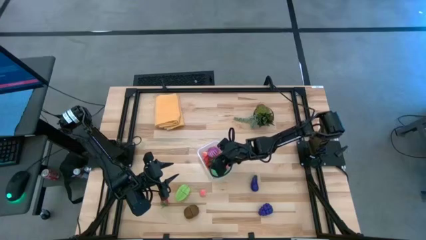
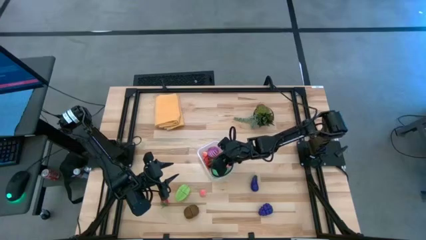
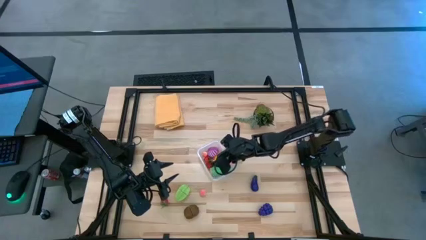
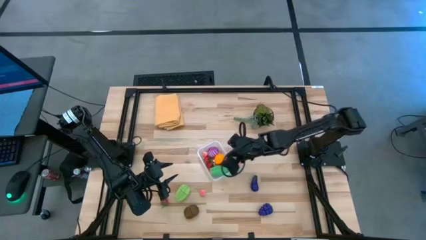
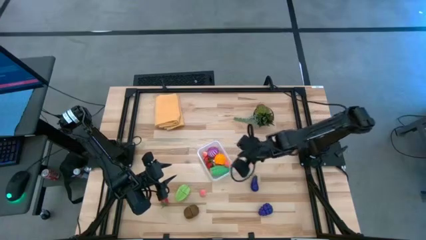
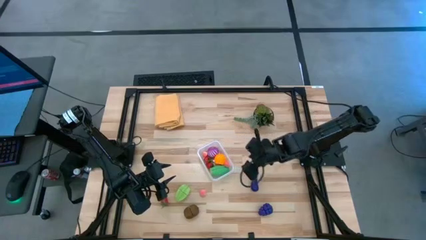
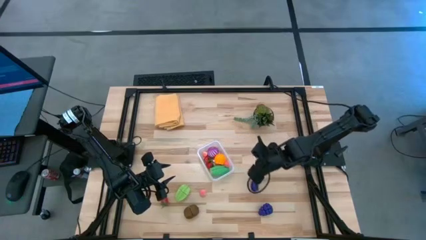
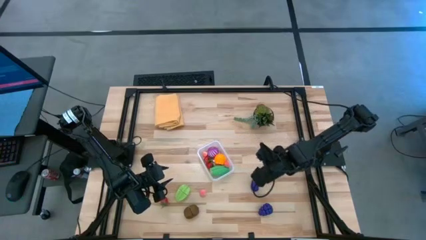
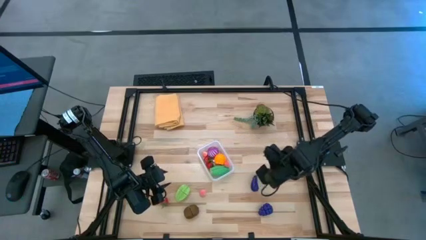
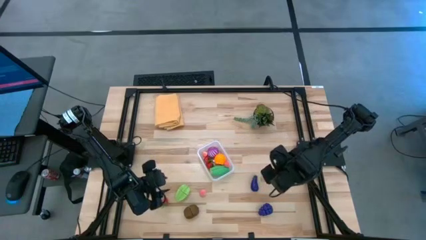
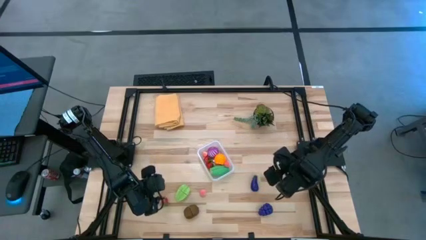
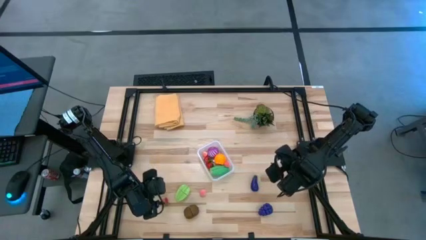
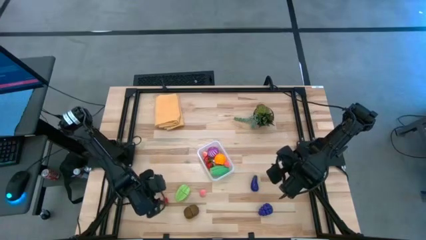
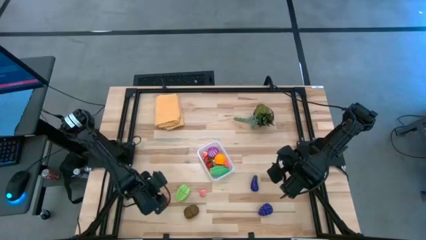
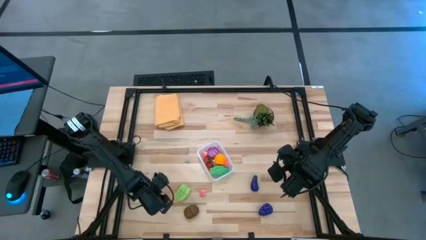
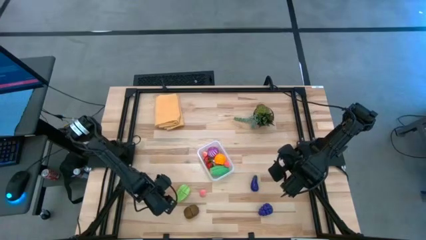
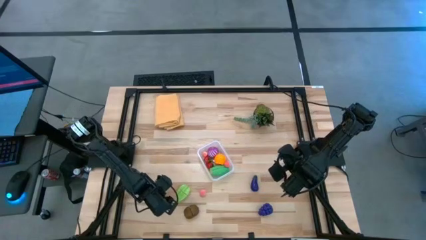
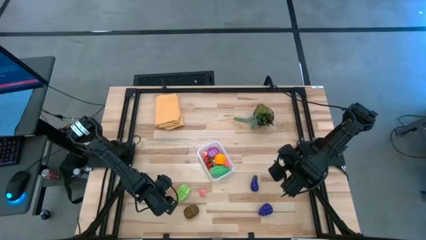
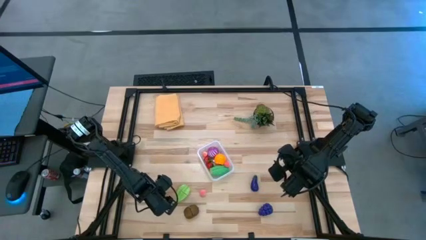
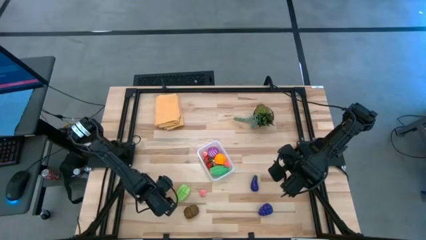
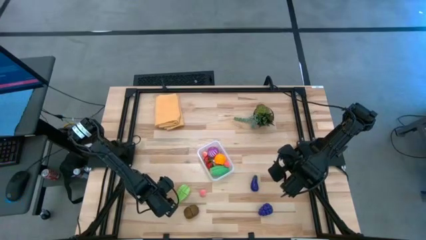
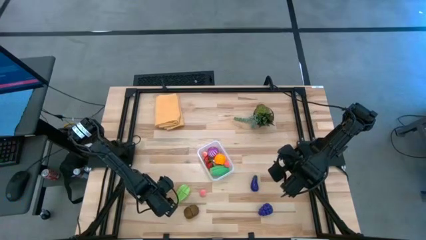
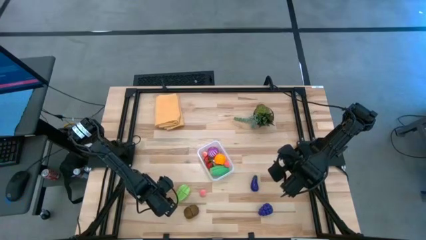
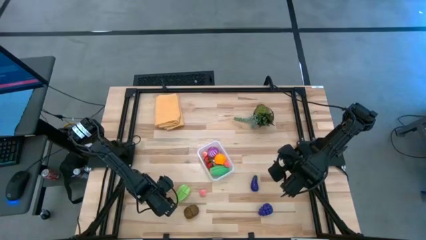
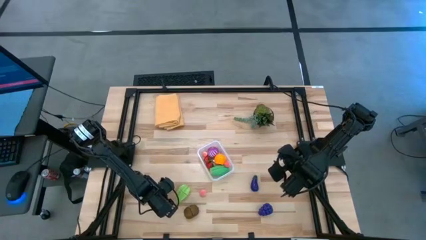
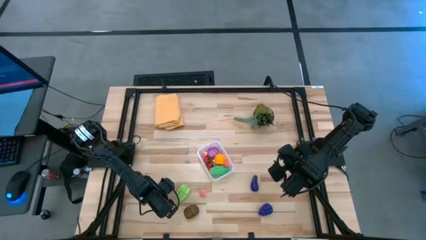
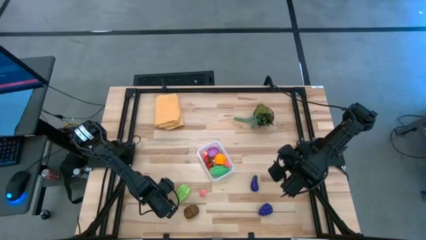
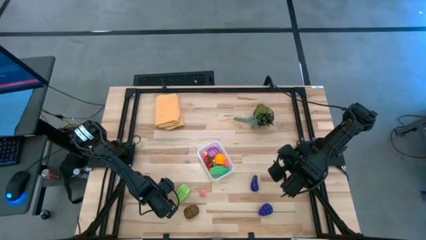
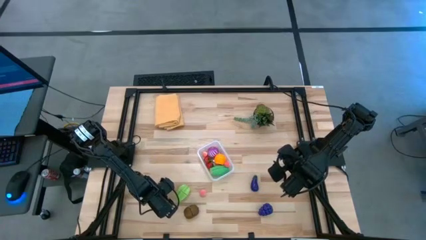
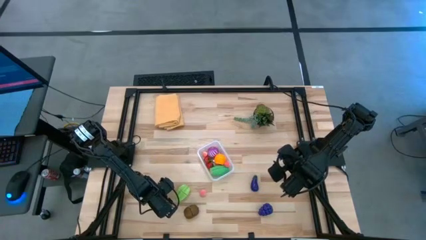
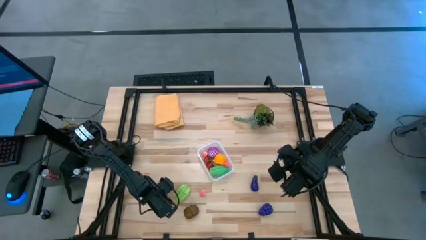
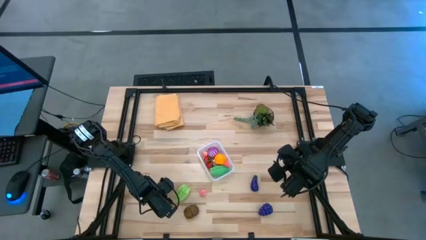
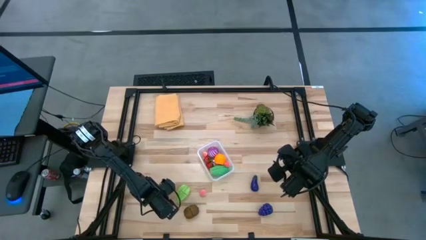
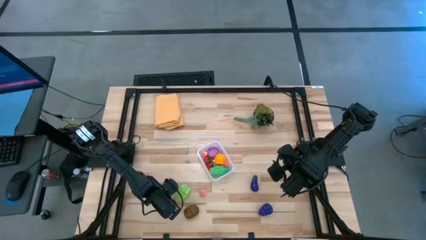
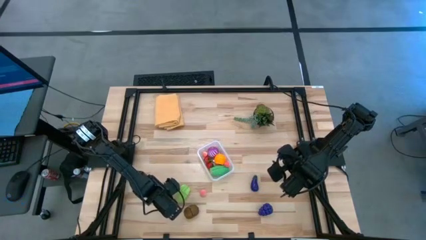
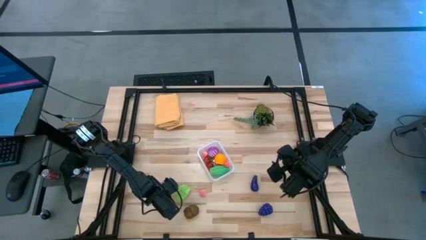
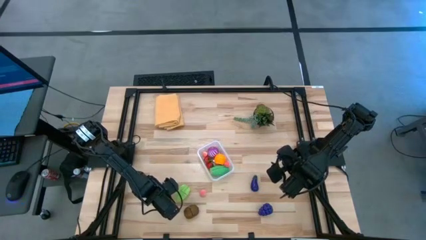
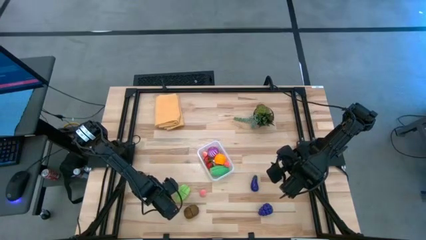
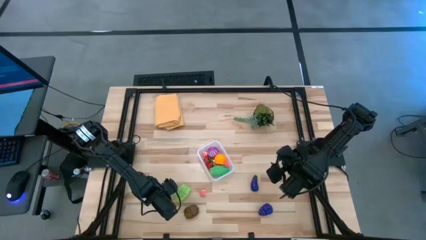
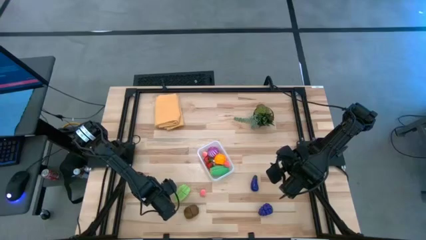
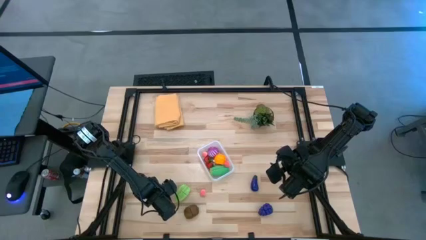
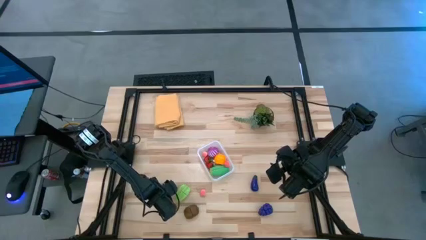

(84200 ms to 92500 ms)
Task: Pick and placing Produce into tupperware
Put the red strawberry into the transparent bin

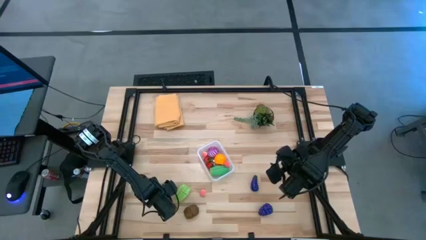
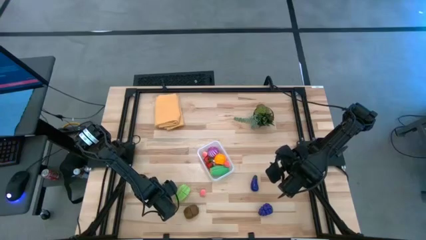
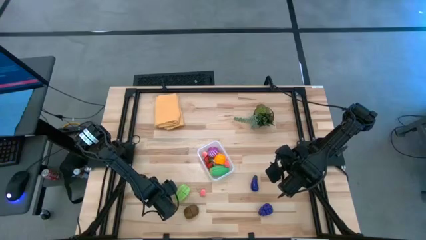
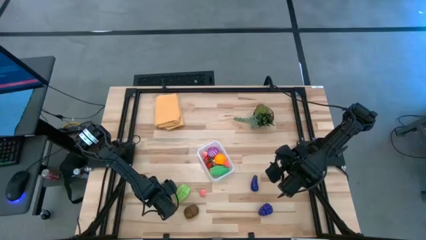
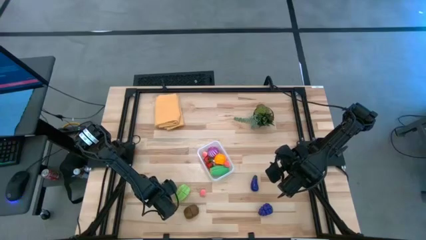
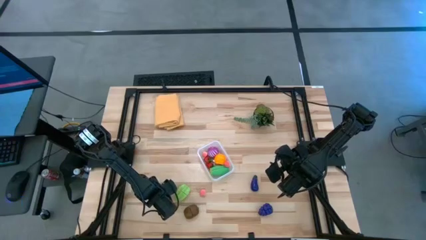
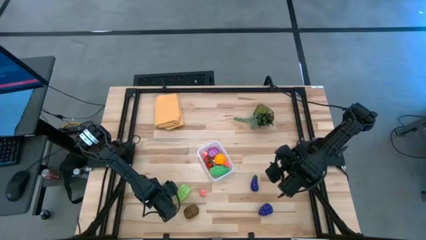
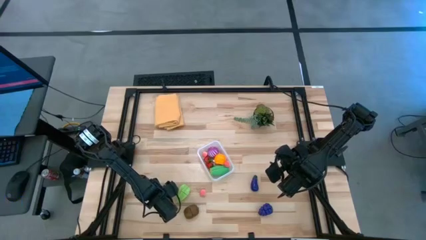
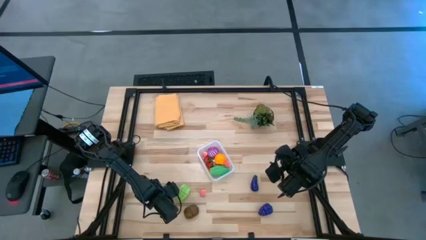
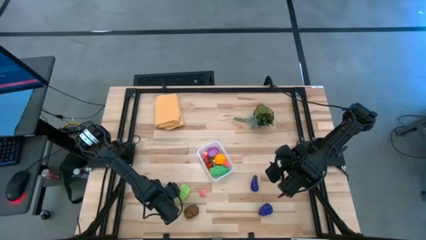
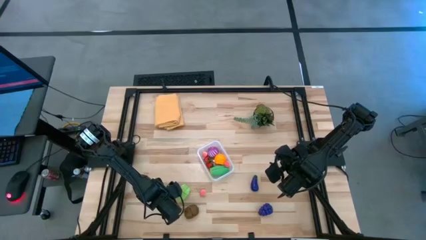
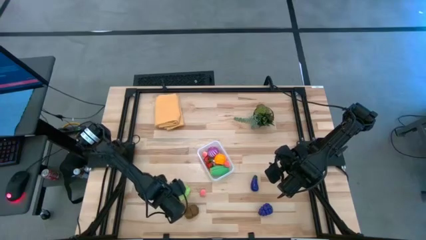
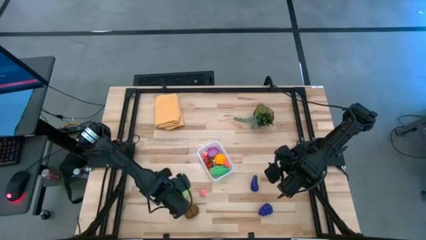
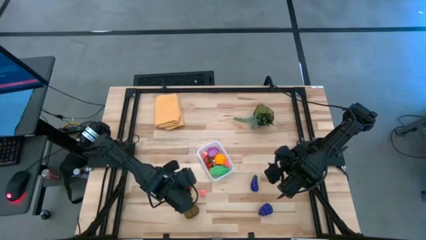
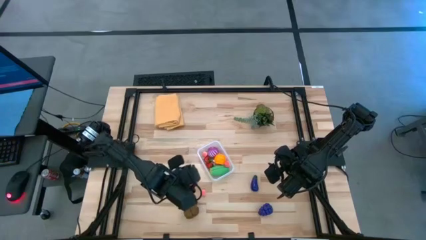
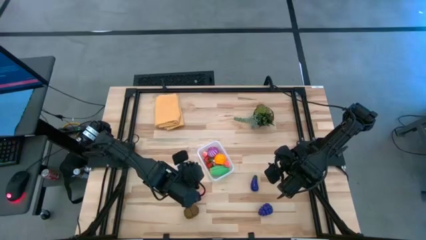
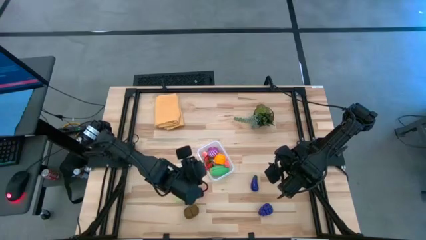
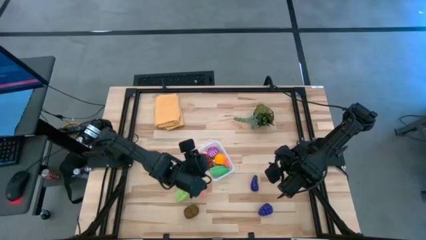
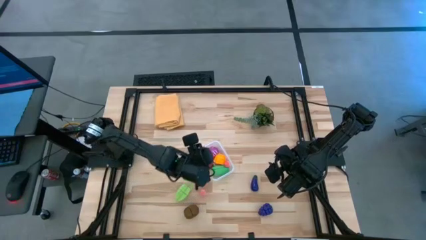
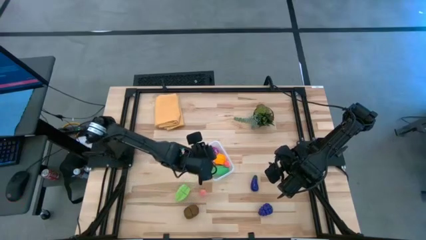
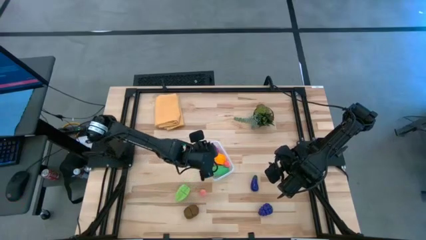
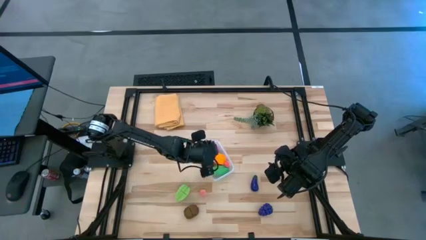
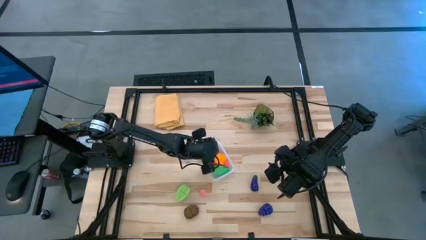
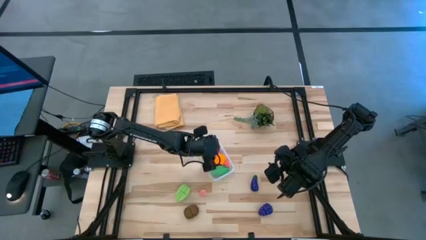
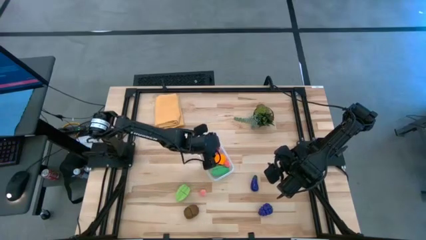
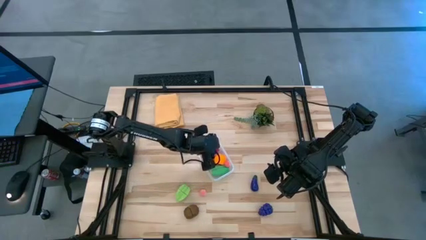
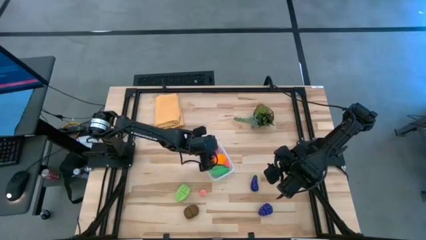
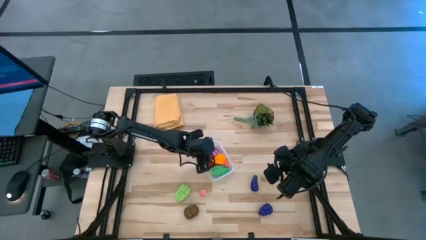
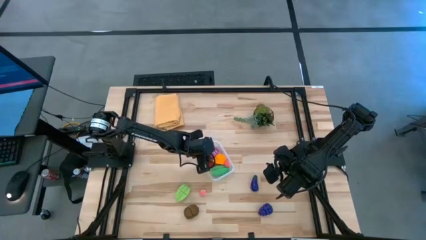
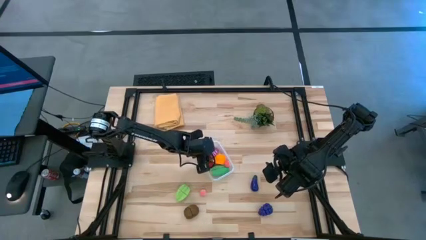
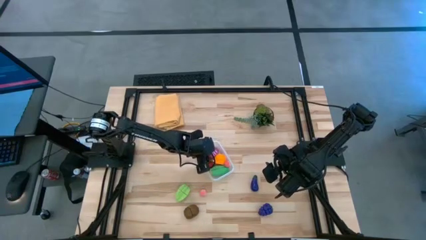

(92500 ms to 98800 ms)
Put the red strawberry into the transparent bin
